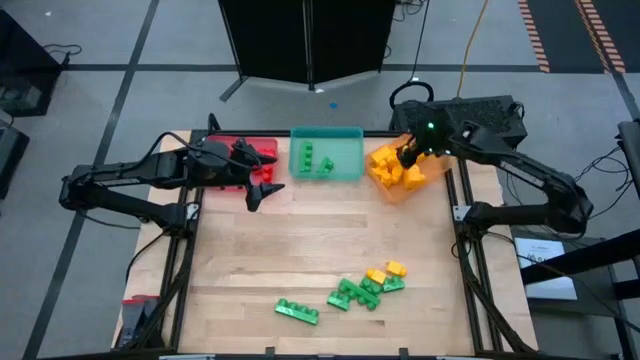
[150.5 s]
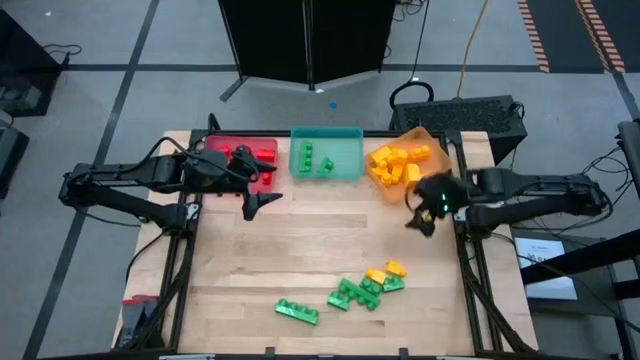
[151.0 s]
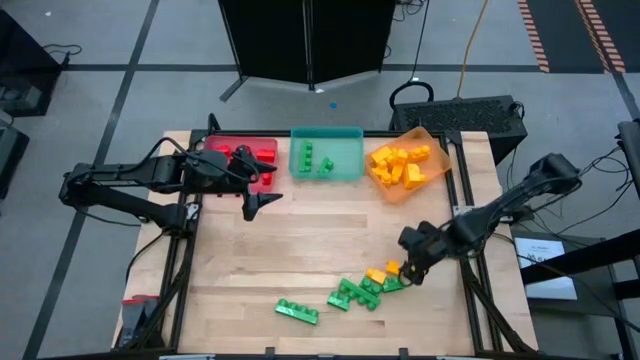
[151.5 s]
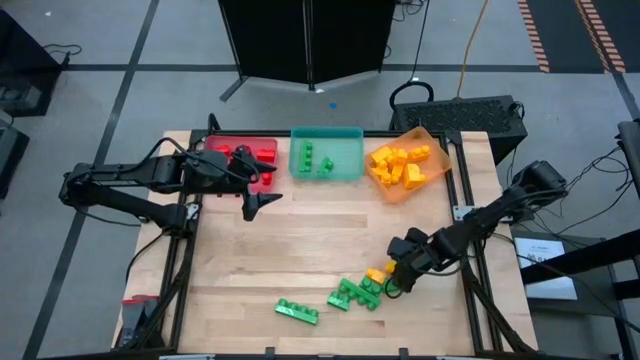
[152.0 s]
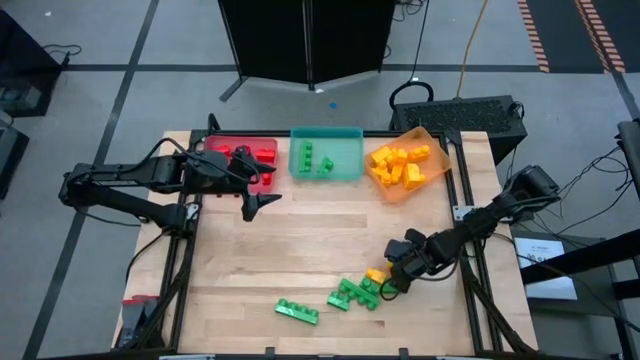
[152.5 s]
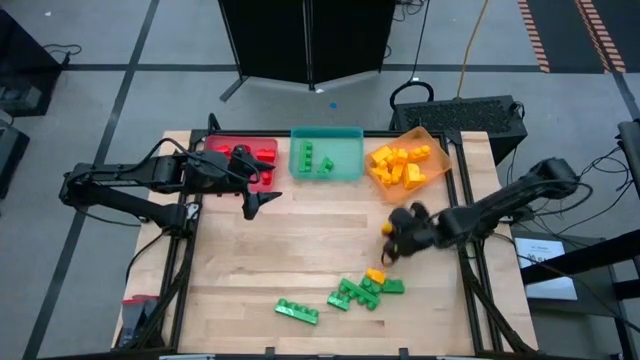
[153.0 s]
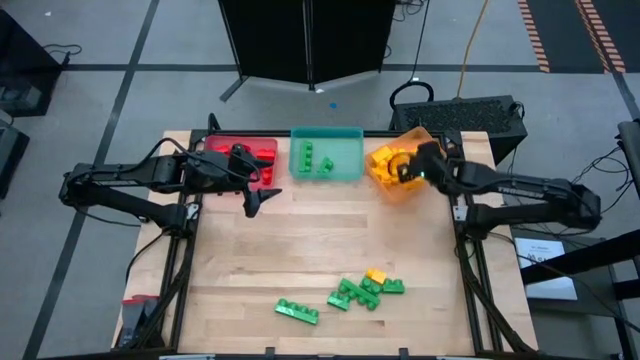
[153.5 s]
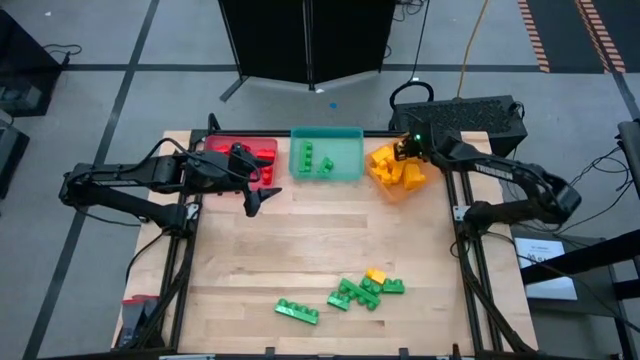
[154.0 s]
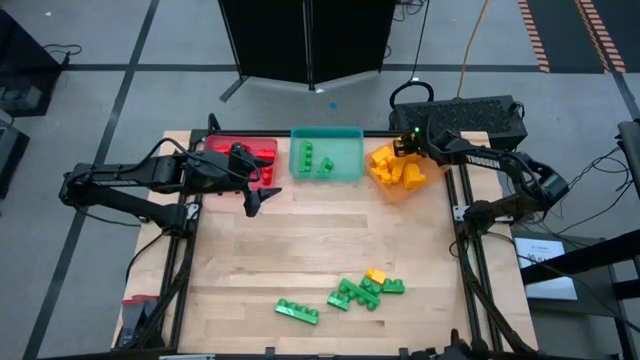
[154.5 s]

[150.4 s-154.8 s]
Task: Sort blocks
Put the yellow game piece into the orange bin

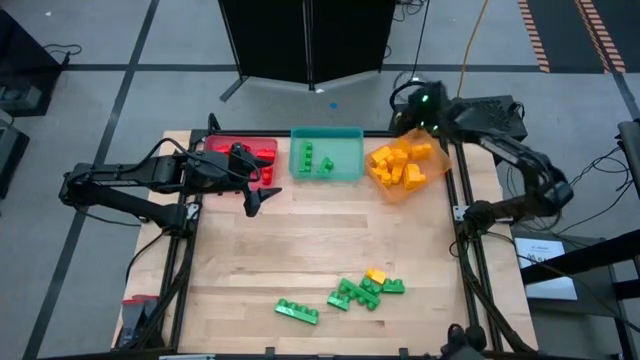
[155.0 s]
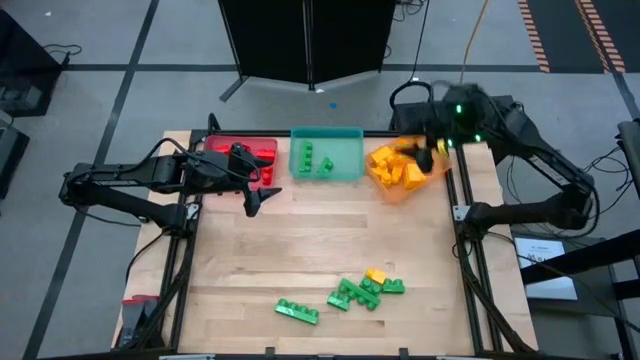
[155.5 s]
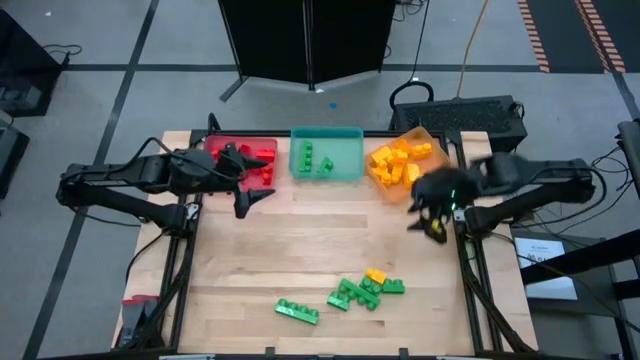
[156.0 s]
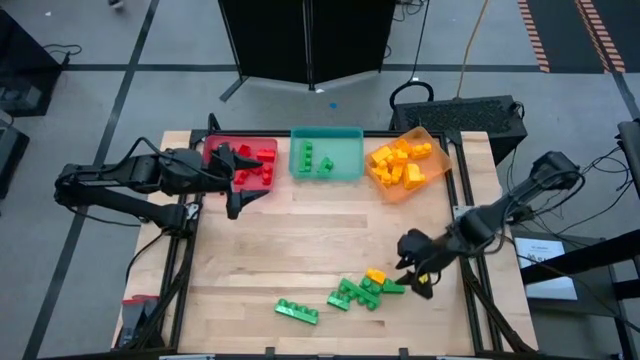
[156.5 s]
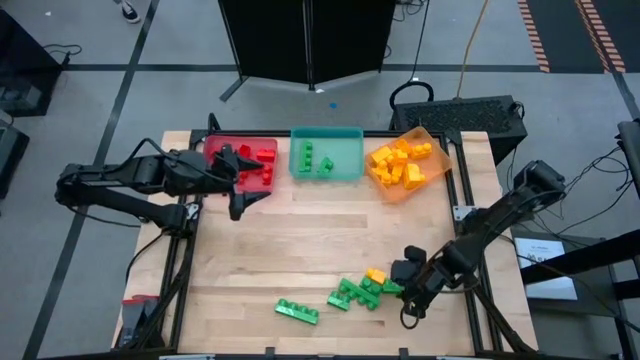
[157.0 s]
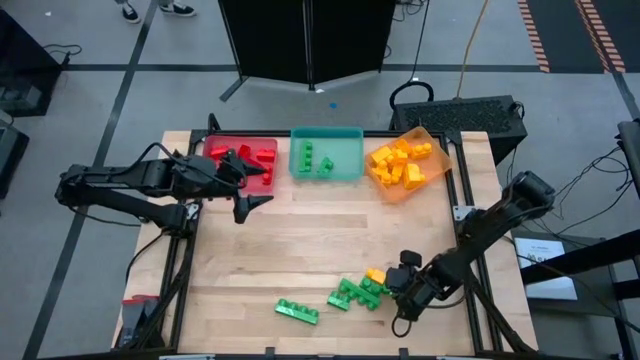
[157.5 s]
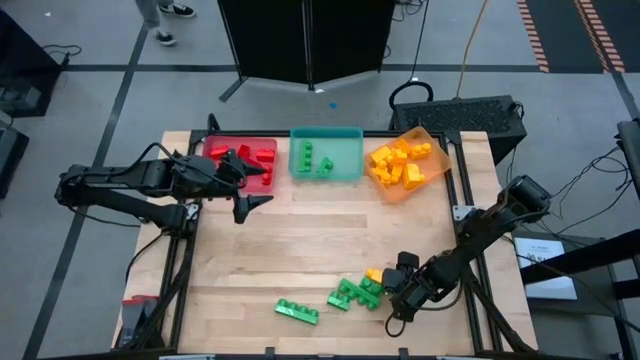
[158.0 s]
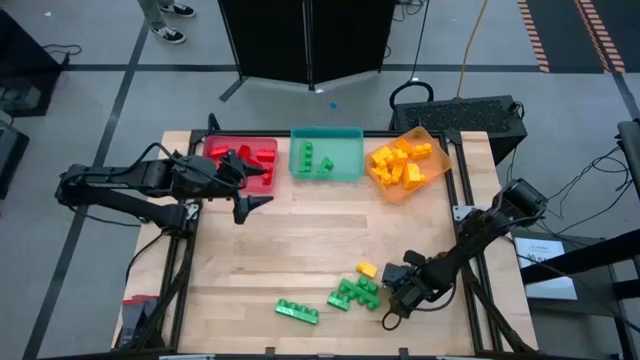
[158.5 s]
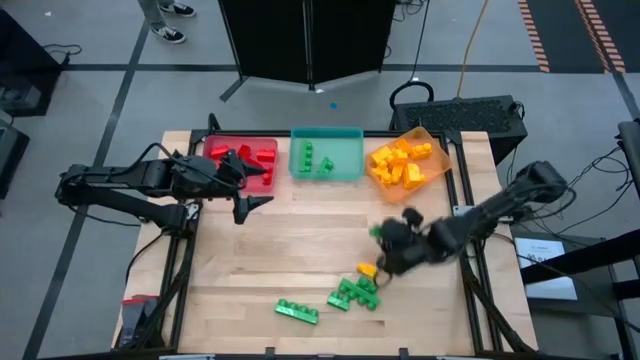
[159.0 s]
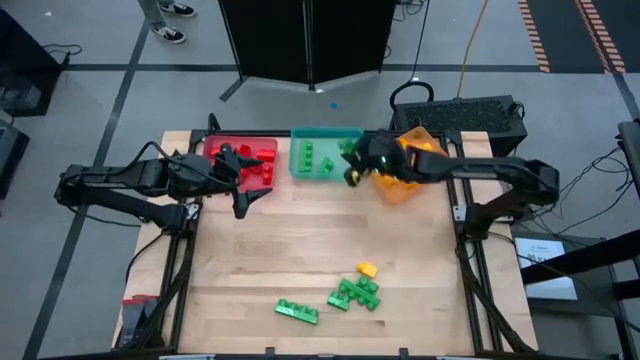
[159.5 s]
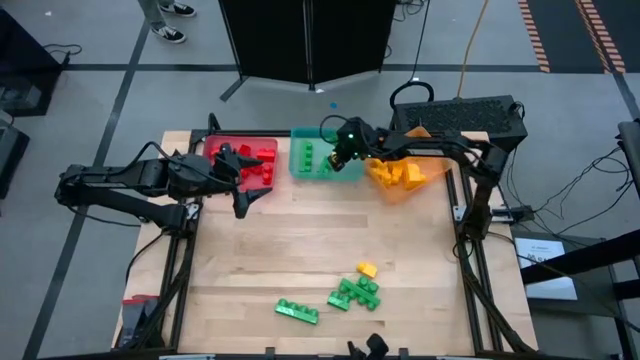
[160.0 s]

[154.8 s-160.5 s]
Put the green game piece into the blue bin

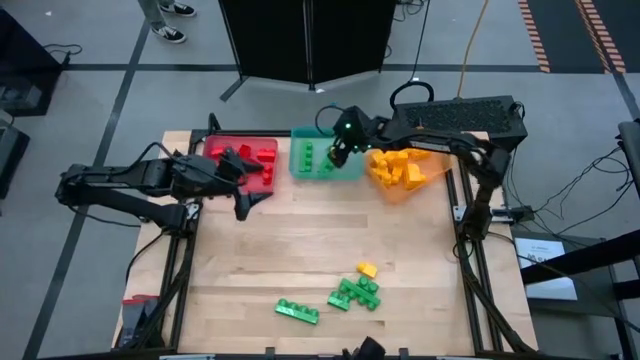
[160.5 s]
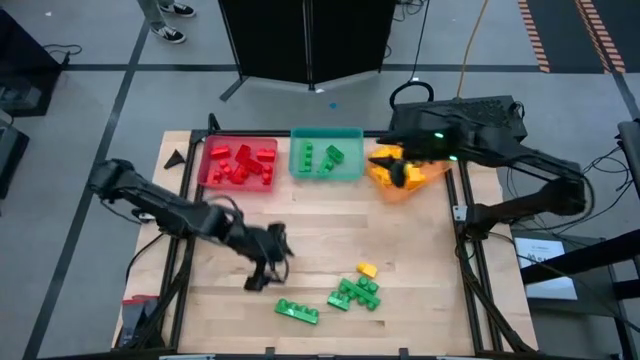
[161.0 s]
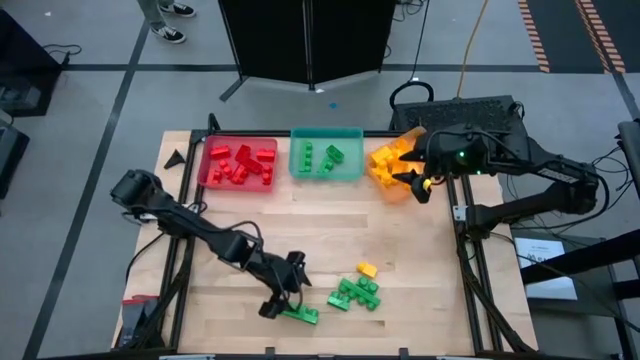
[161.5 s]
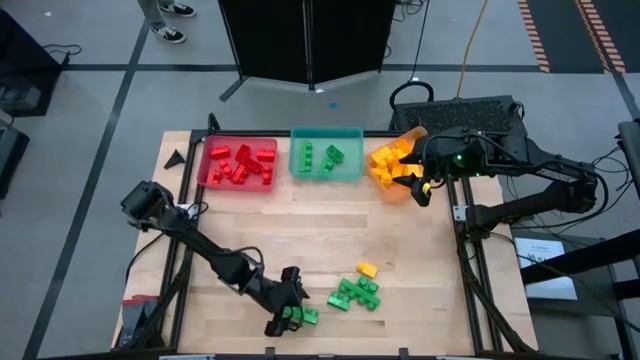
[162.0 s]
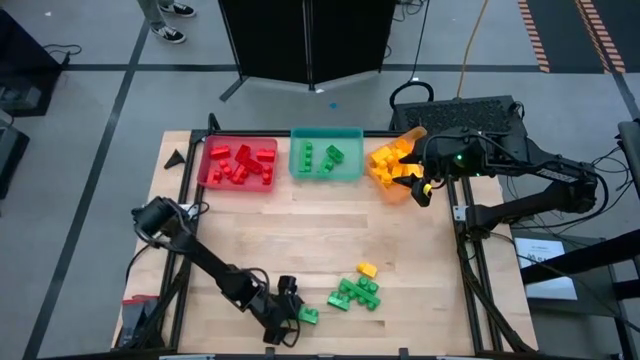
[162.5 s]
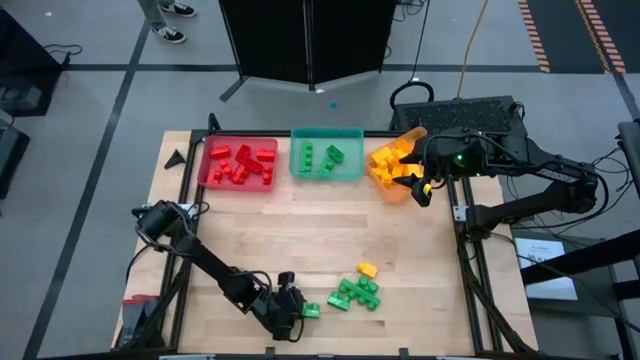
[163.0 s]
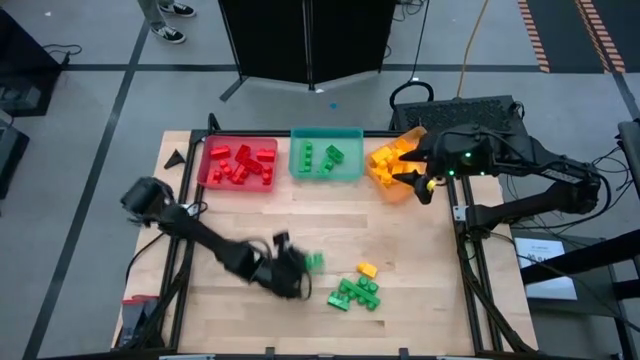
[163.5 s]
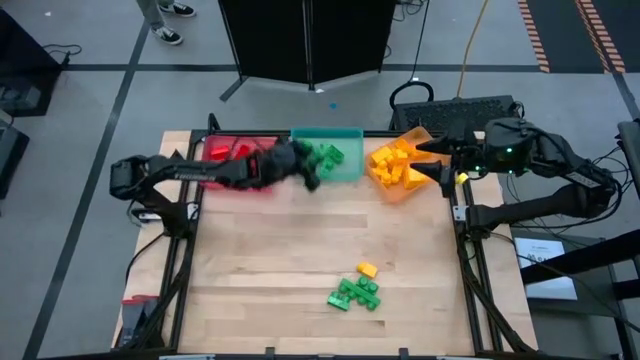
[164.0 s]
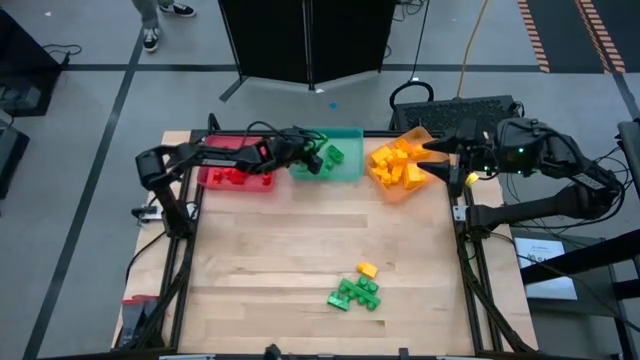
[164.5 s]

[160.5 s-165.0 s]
Put the green game piece into the blue bin

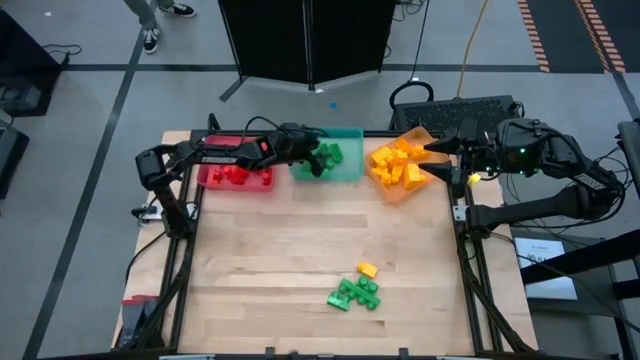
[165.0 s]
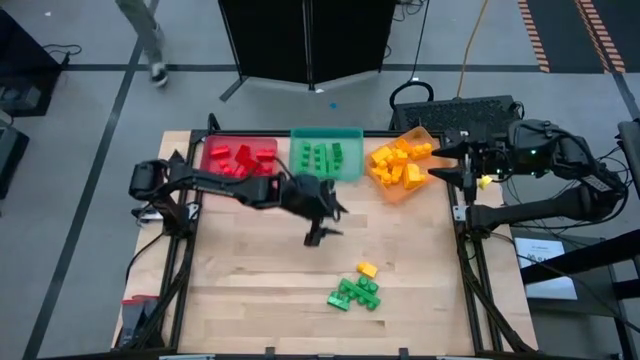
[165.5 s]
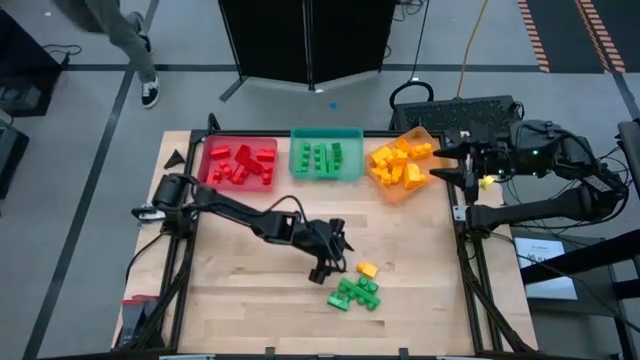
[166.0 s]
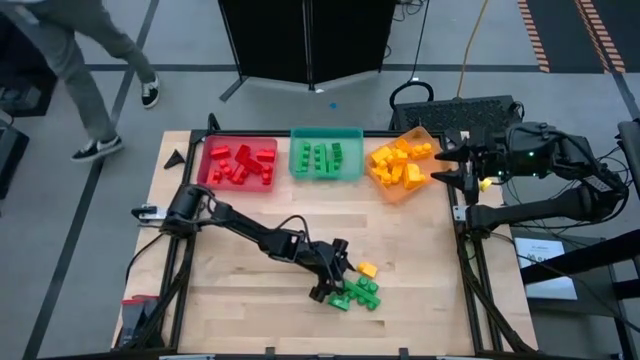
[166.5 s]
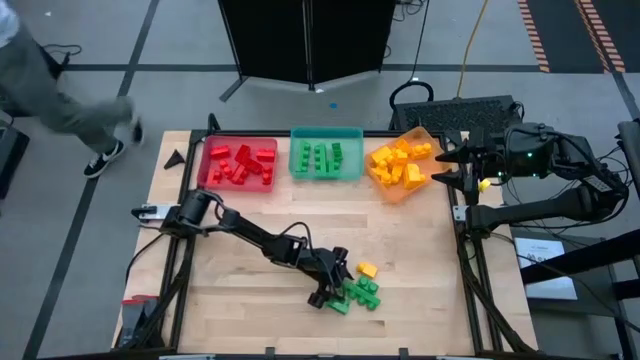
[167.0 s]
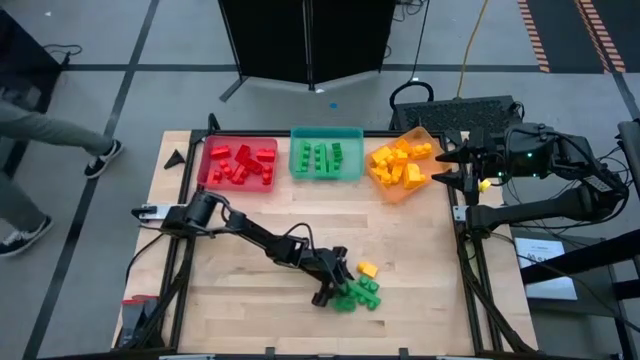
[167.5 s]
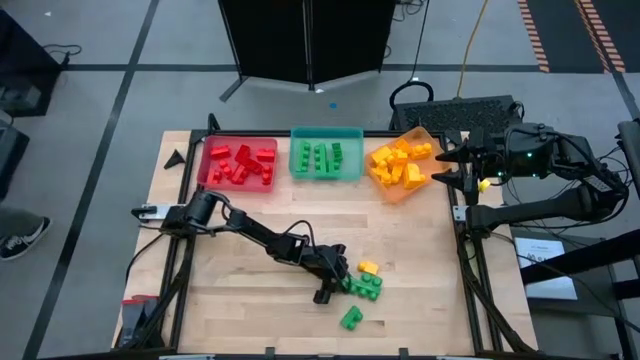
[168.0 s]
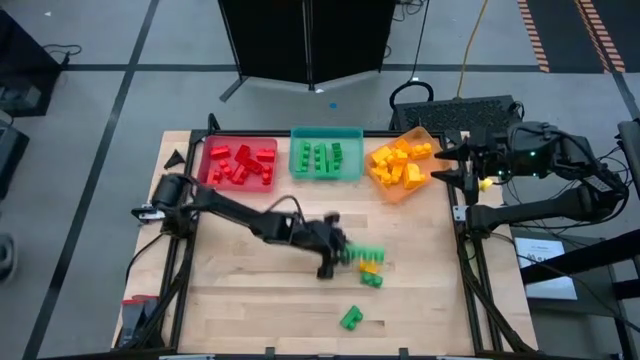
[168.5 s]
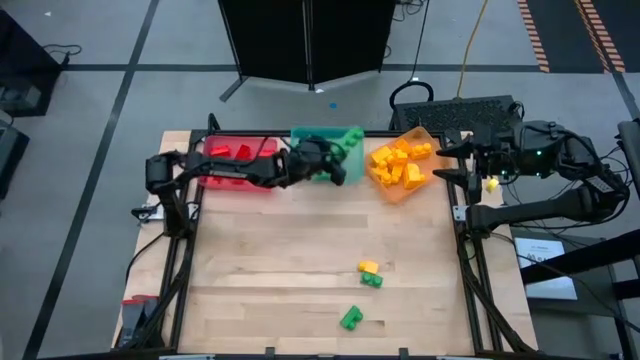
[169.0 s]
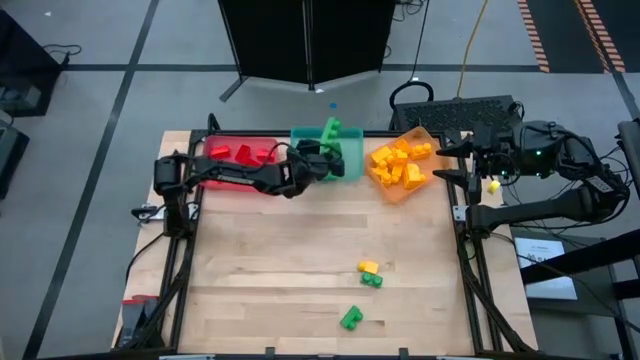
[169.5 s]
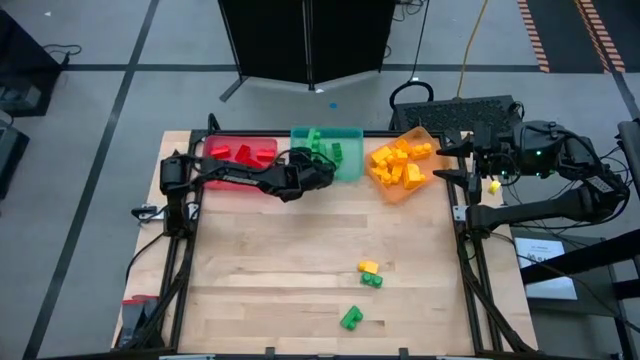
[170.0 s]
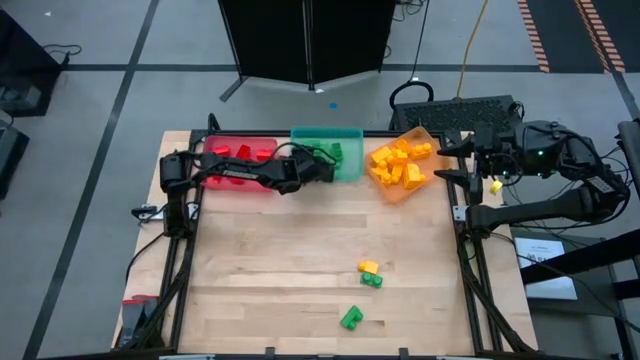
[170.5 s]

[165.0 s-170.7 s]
Put the green game piece into the blue bin
